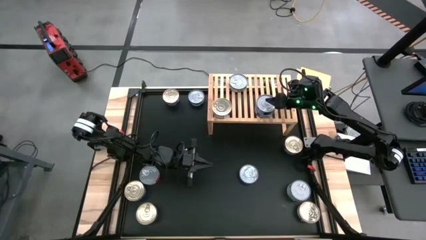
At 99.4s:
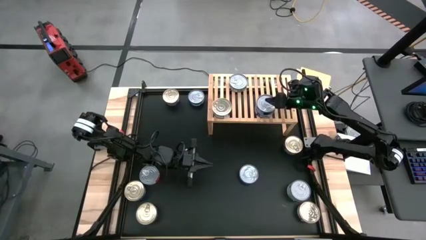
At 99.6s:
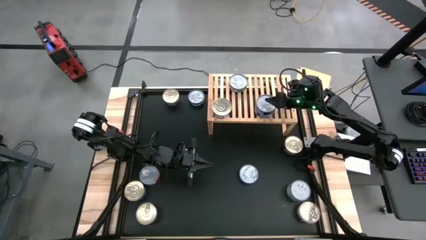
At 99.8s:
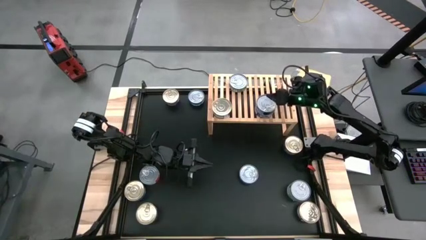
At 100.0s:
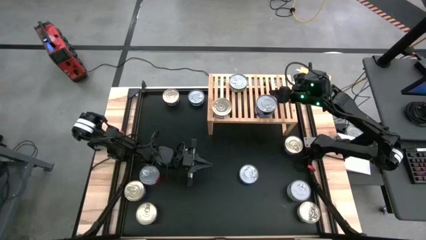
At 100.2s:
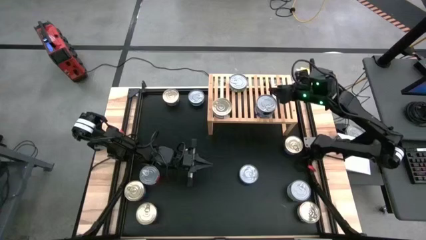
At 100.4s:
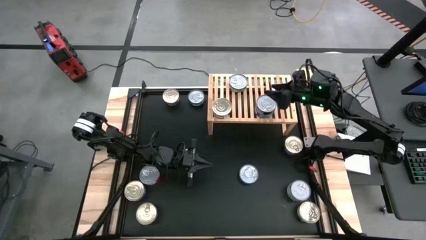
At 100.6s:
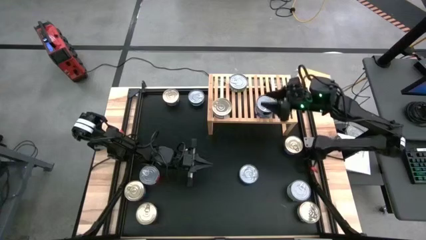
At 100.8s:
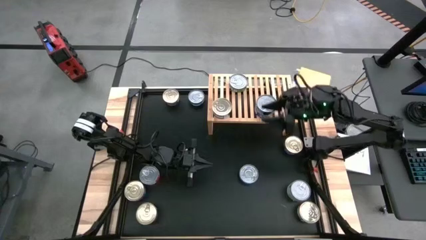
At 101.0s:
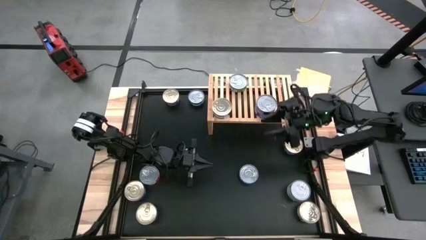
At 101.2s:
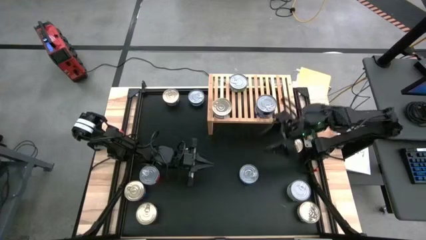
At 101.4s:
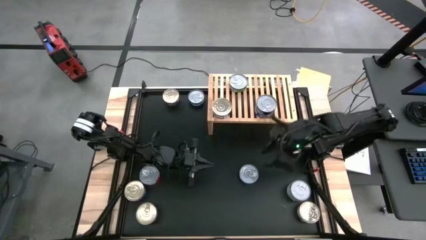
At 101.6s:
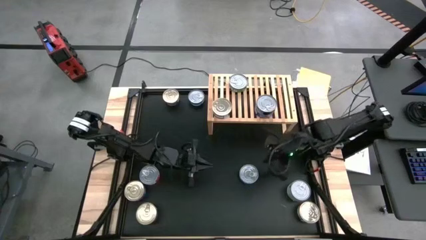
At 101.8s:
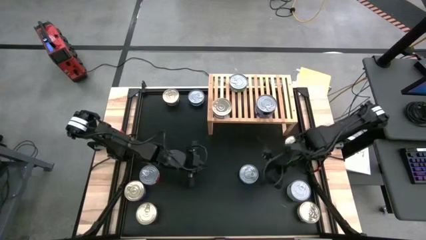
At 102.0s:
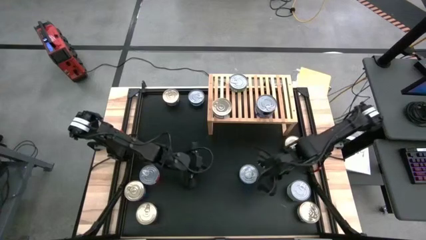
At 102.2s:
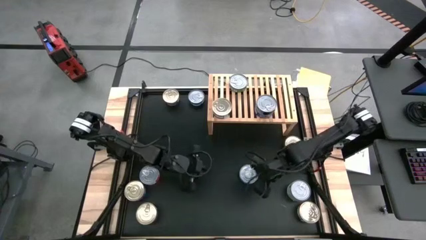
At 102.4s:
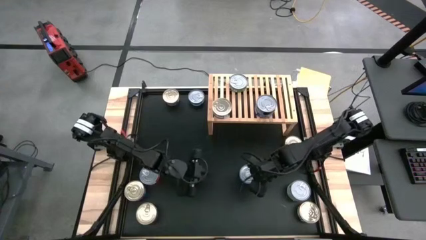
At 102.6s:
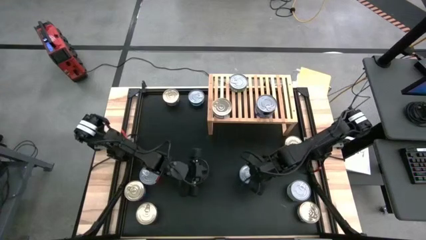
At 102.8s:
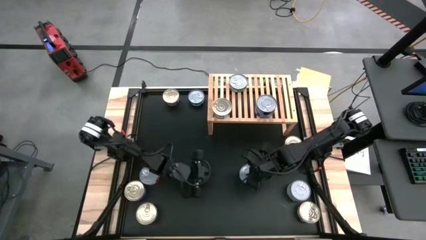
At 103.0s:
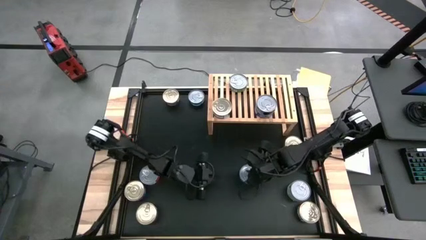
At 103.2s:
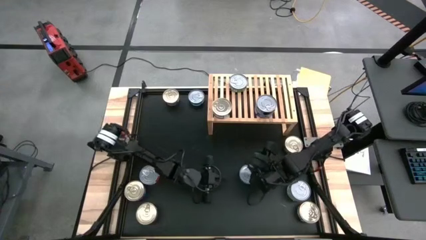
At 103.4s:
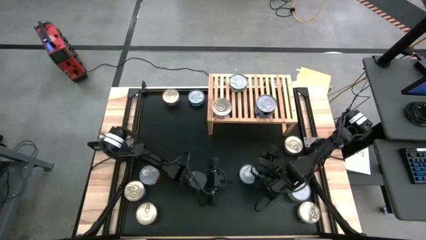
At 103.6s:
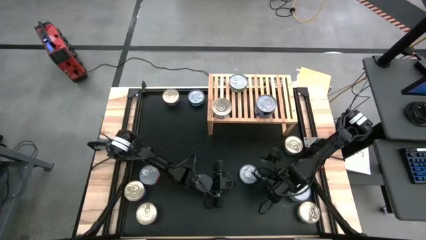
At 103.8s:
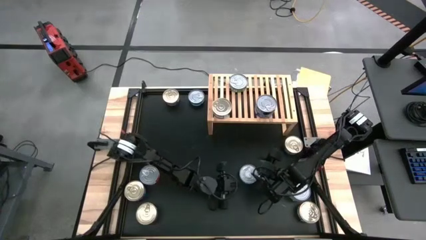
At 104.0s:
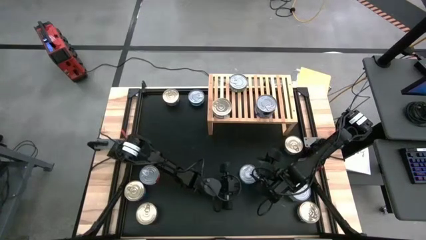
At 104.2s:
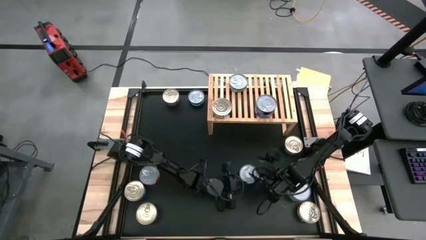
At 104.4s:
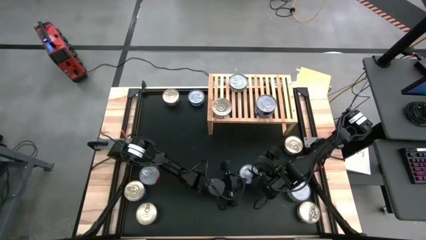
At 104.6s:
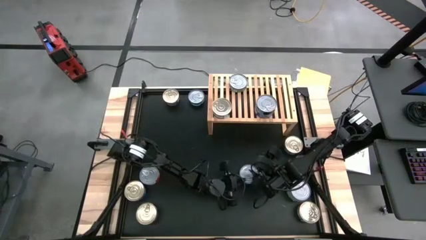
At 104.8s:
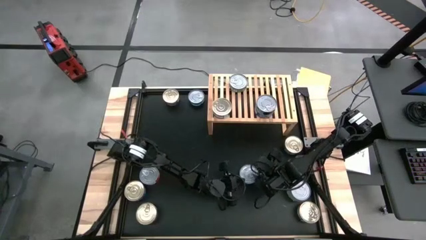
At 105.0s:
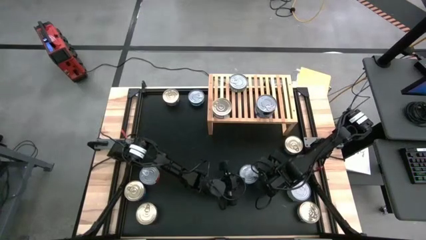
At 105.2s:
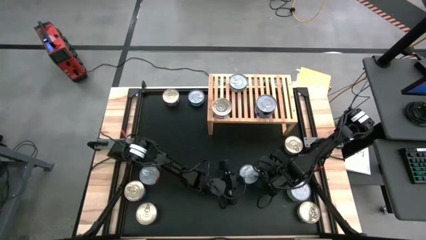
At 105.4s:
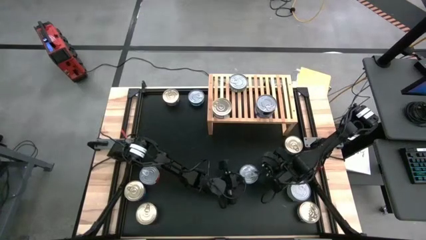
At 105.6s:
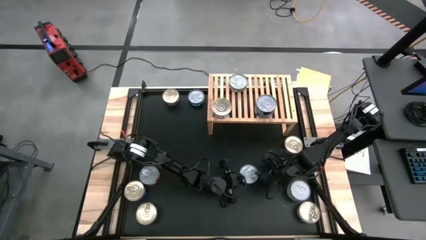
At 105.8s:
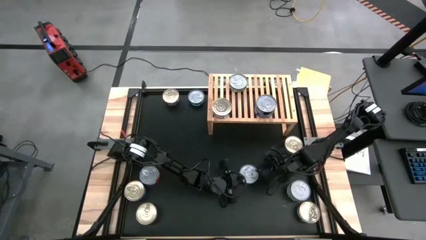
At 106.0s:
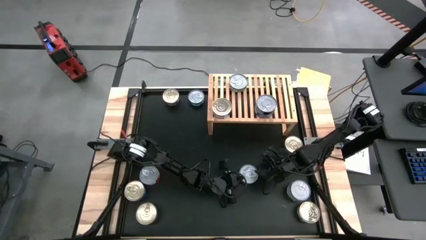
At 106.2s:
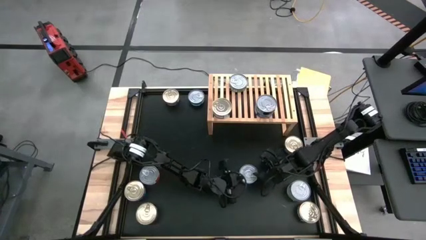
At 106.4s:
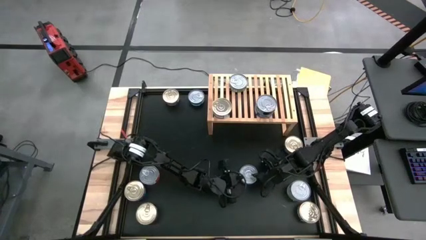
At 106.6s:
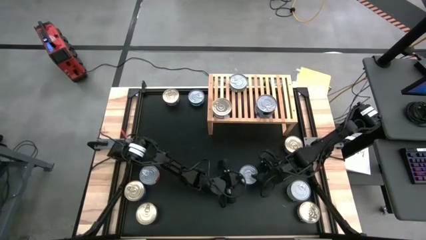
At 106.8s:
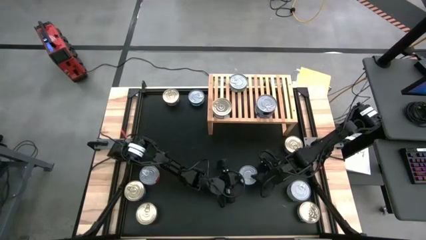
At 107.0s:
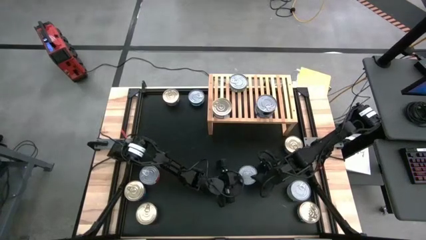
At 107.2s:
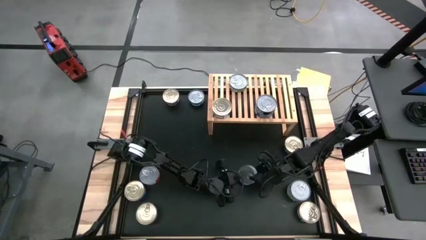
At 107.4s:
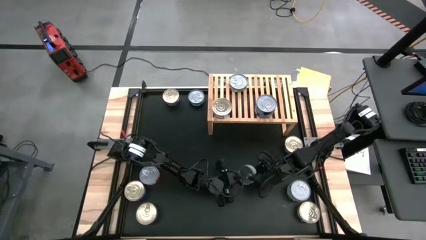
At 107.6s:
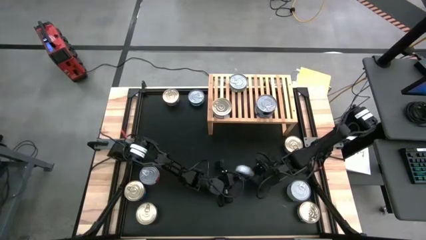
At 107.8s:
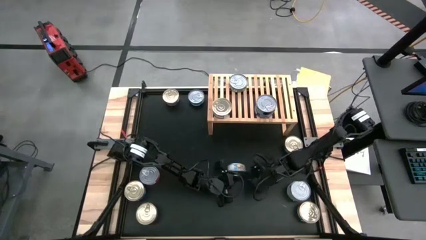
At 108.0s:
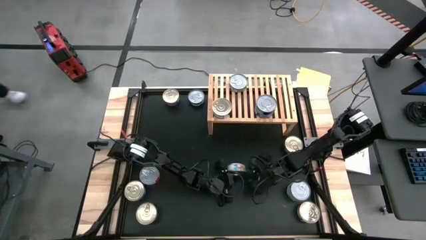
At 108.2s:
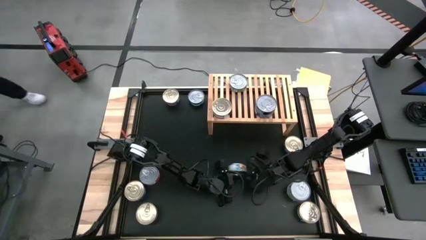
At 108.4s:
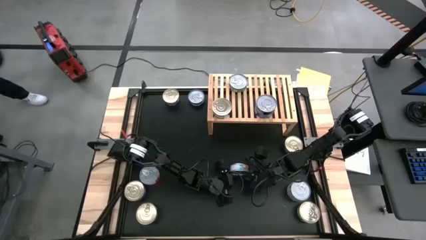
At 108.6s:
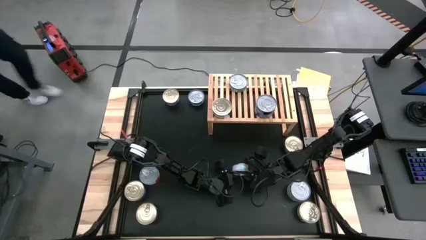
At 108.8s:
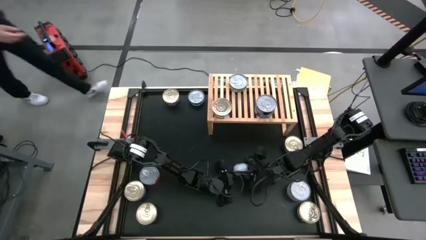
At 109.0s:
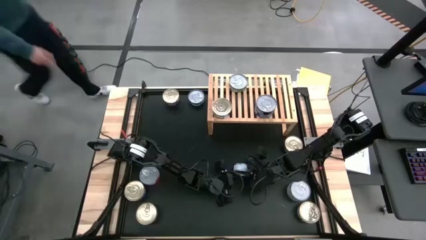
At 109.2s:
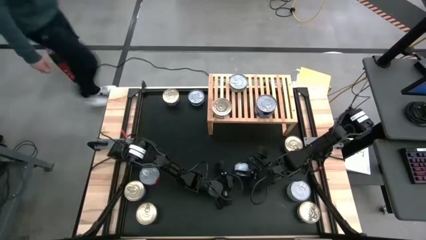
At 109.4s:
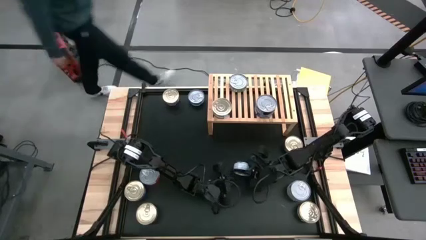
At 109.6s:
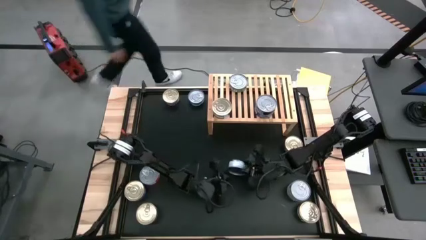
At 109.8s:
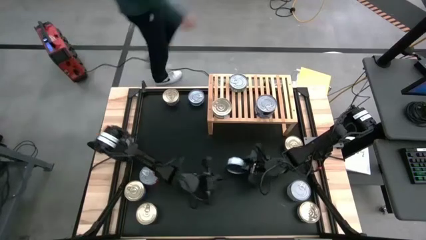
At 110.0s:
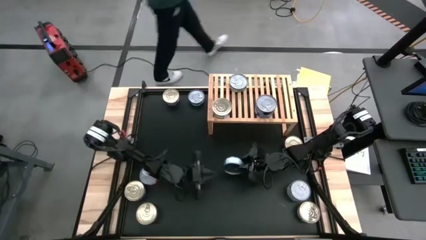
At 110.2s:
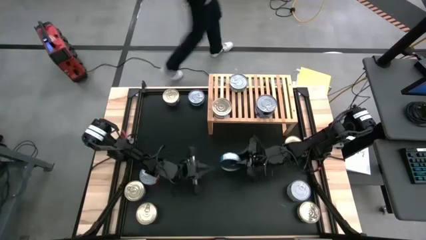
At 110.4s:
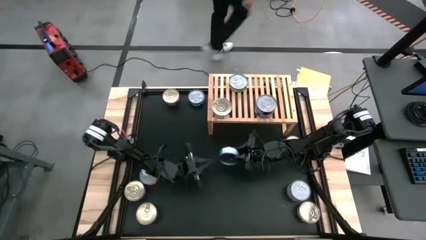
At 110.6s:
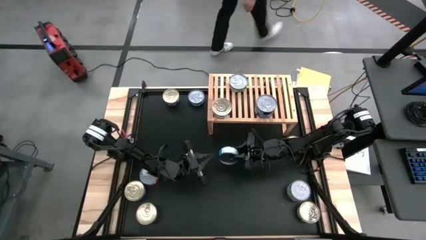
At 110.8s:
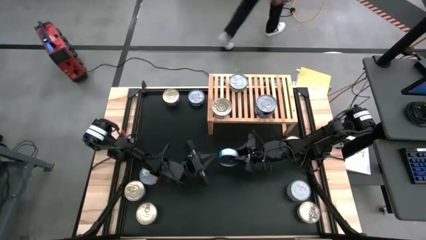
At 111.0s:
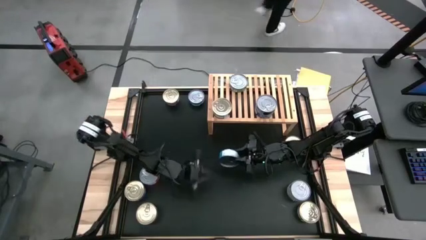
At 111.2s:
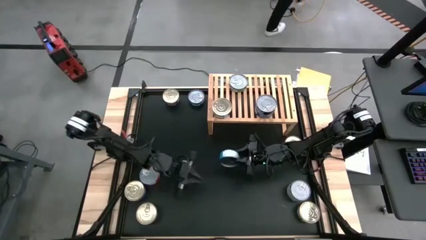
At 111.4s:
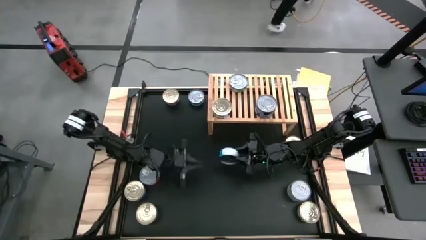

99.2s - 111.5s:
Task: Stack canned seafood by type on shelf
Put the yellow-blue tuna can on the shelf
